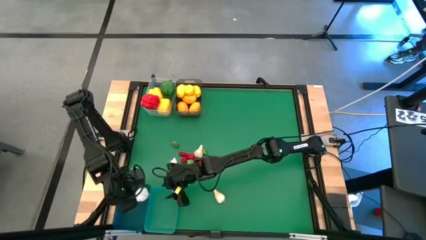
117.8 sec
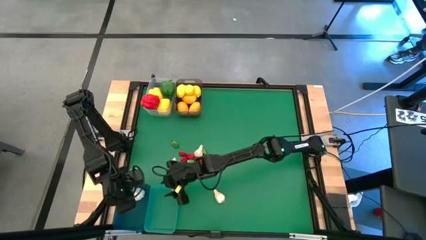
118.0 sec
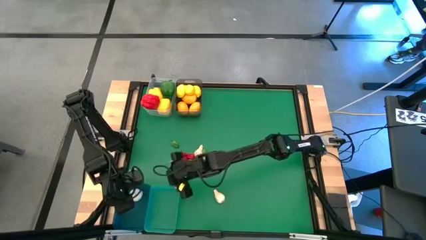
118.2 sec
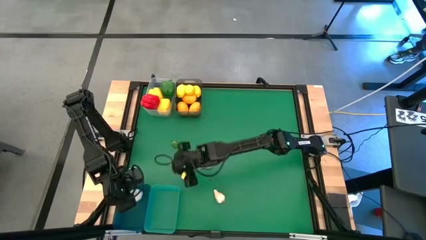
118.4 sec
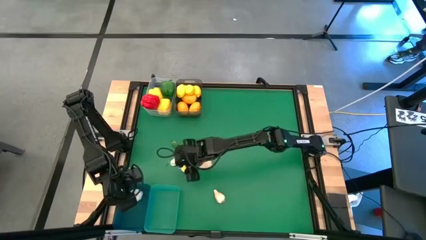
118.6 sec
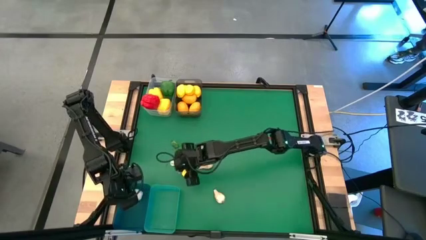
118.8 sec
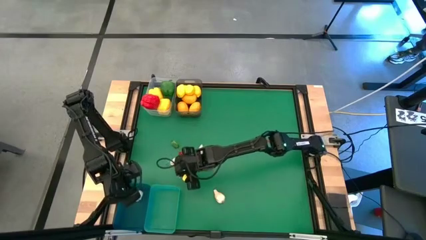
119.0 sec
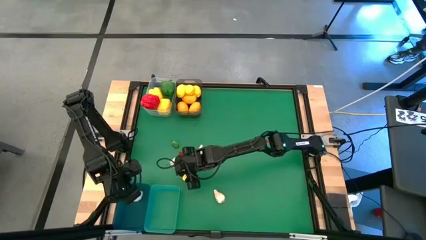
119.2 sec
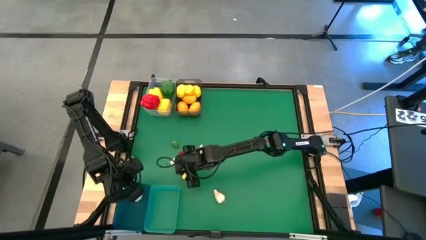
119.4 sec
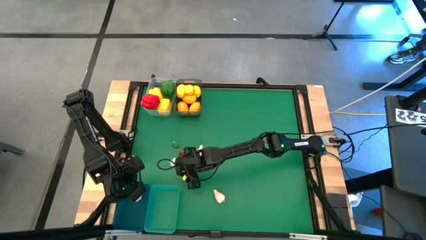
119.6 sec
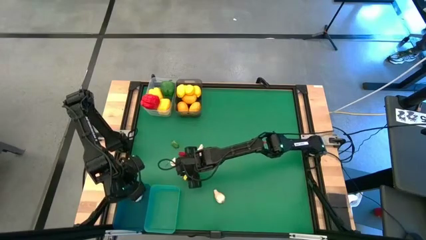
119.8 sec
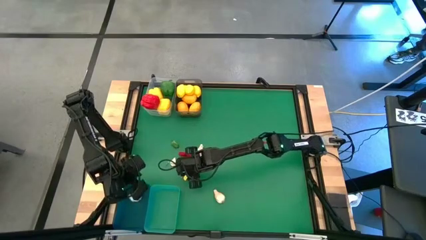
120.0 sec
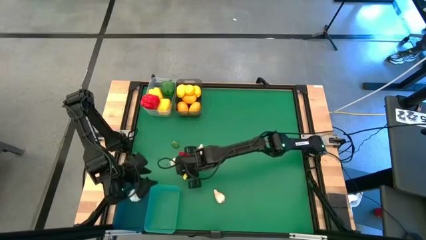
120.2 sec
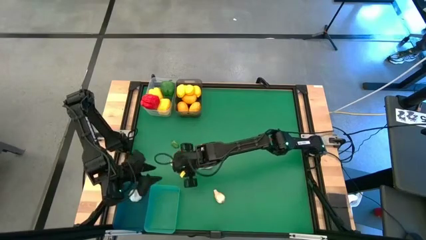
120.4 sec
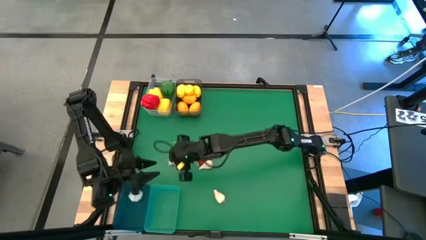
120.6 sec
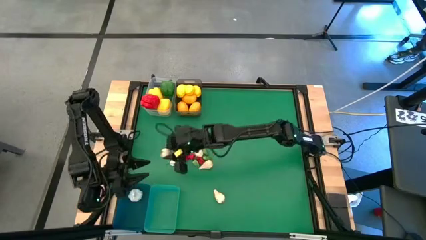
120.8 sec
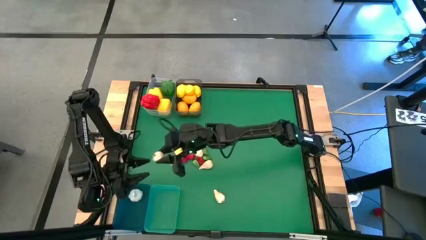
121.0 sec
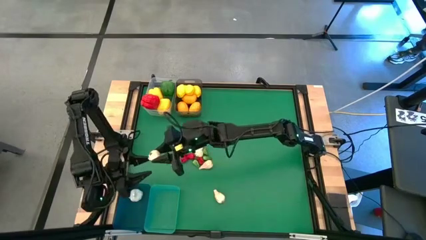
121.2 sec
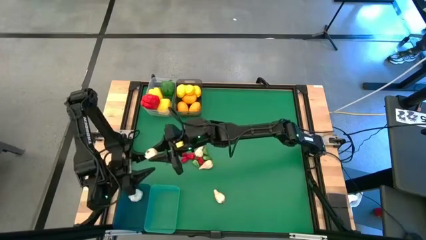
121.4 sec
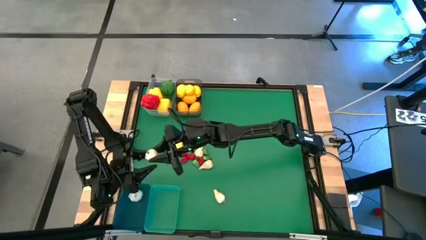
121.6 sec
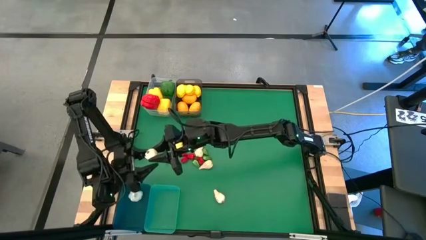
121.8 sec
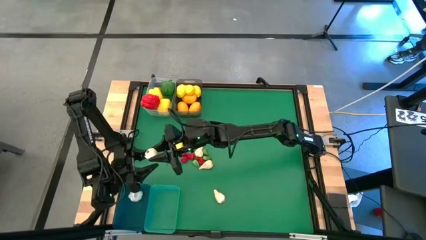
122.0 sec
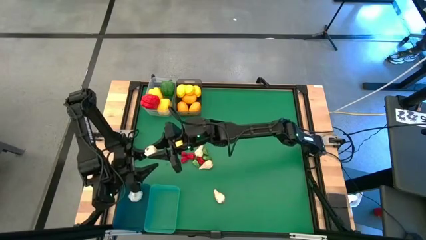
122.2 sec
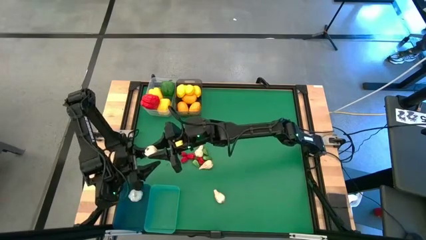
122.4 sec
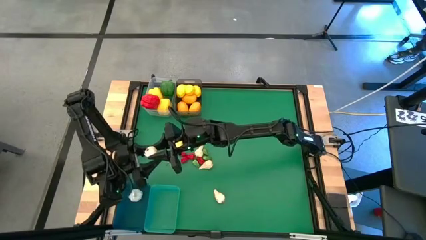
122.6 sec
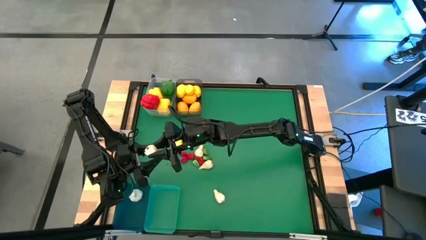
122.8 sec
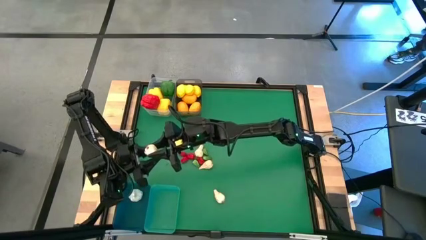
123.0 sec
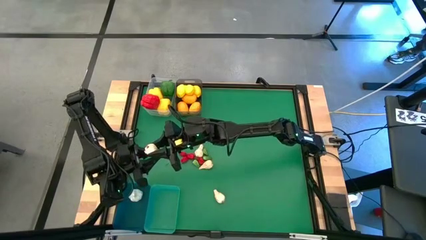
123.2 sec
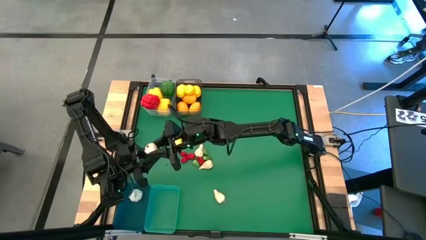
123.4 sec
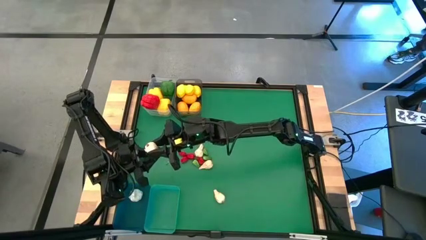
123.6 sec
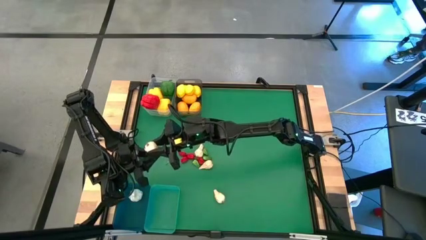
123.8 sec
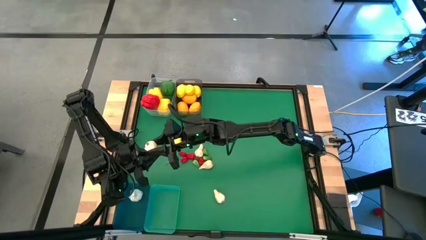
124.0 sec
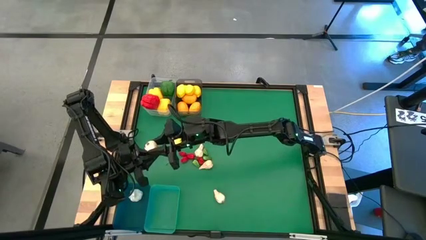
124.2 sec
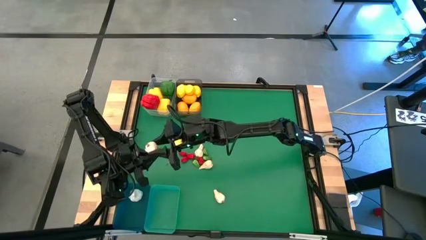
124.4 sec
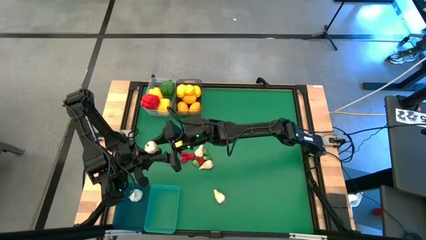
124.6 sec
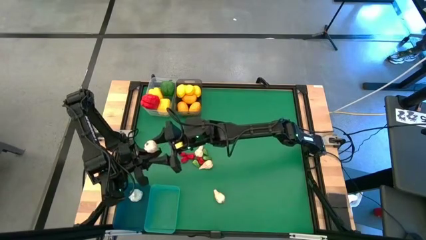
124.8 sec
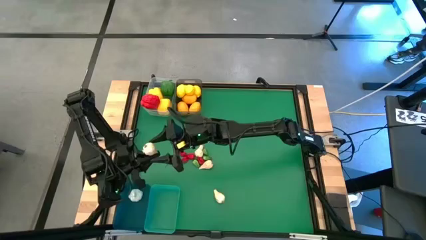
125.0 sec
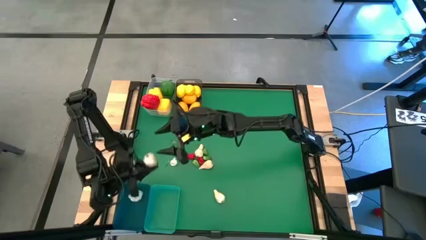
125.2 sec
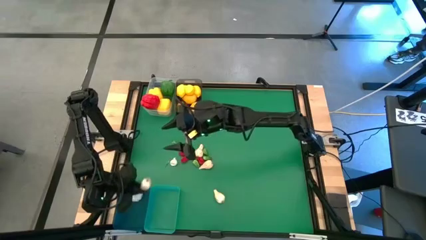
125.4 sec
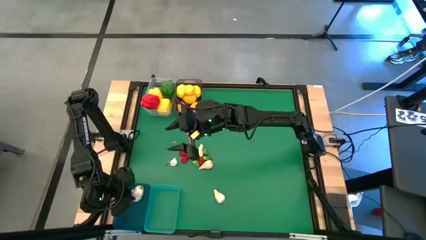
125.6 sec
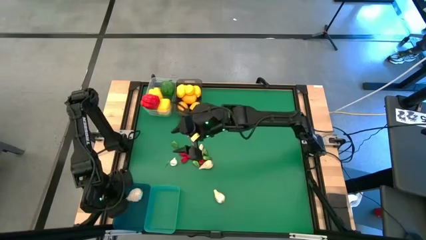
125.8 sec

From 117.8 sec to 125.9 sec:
Task: Sort produce into baskets
Put the white garlic into the blue bin

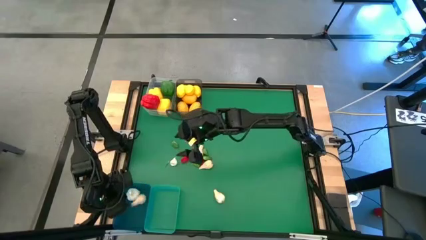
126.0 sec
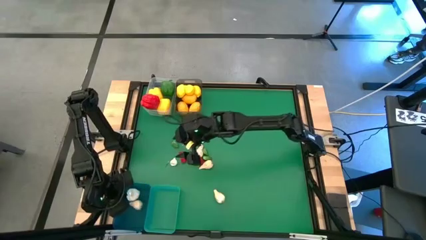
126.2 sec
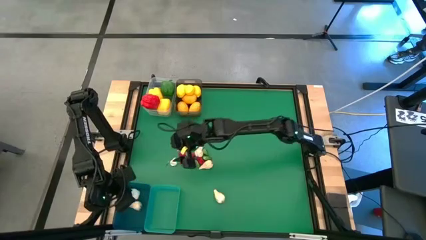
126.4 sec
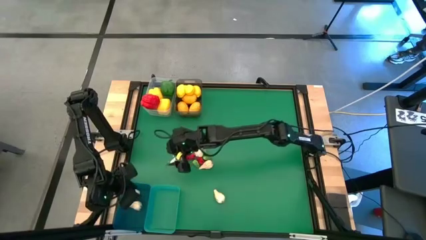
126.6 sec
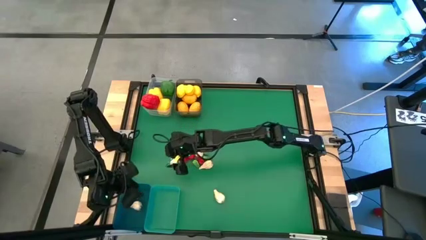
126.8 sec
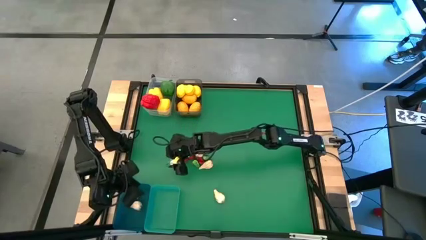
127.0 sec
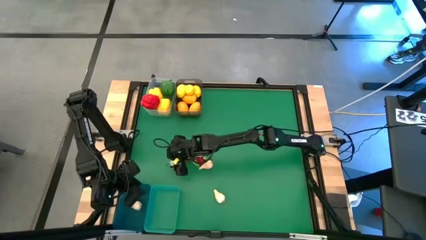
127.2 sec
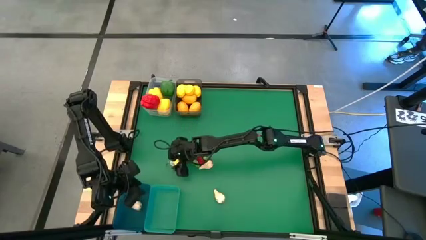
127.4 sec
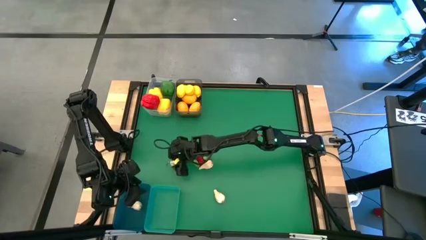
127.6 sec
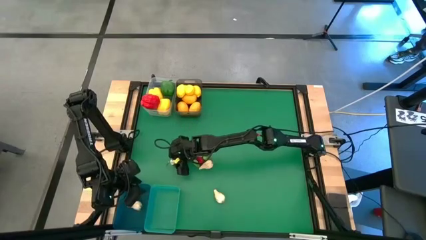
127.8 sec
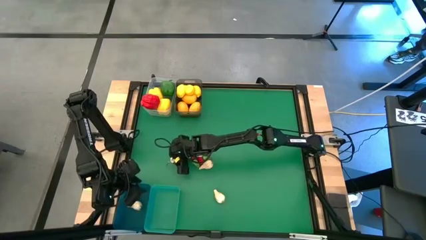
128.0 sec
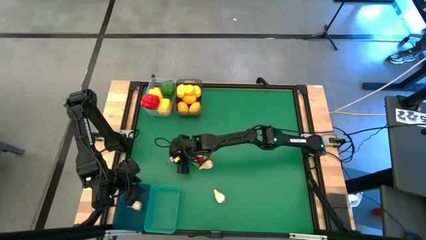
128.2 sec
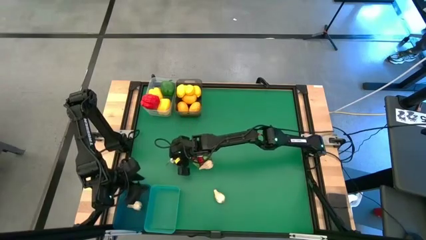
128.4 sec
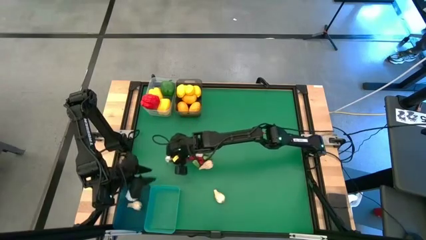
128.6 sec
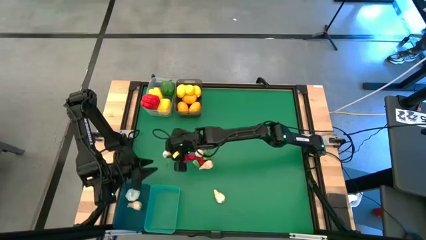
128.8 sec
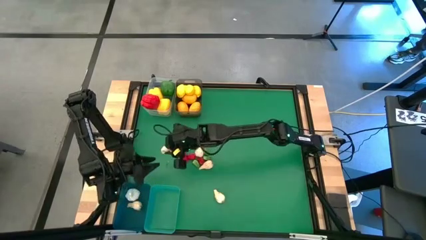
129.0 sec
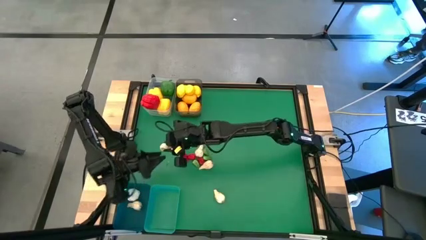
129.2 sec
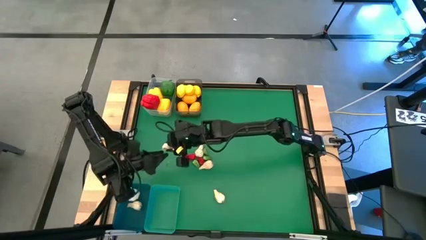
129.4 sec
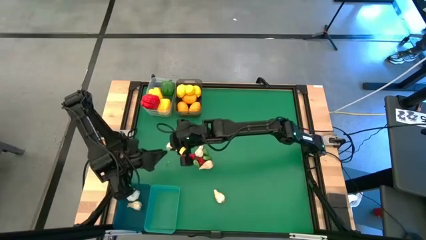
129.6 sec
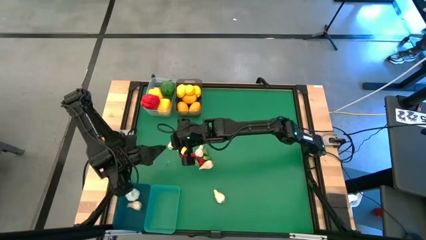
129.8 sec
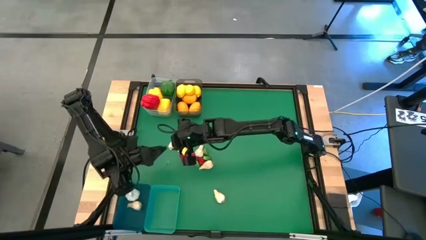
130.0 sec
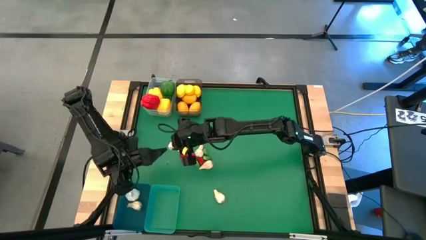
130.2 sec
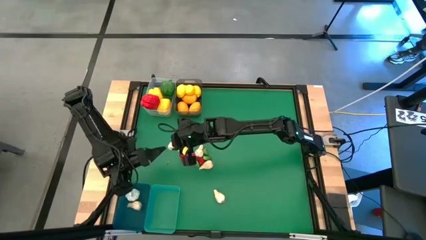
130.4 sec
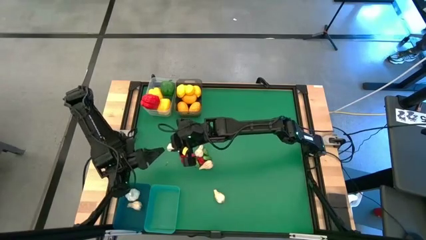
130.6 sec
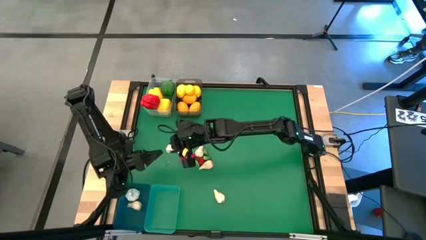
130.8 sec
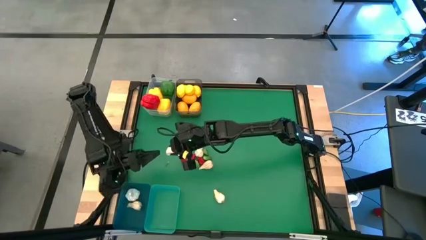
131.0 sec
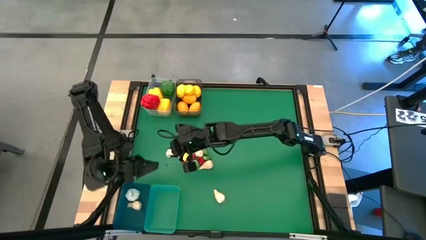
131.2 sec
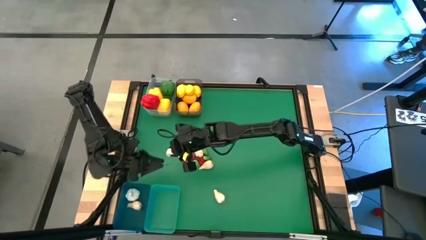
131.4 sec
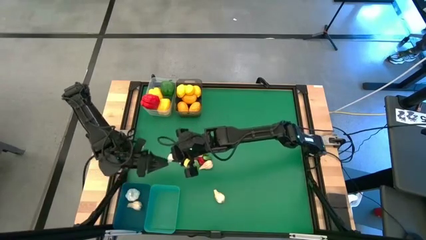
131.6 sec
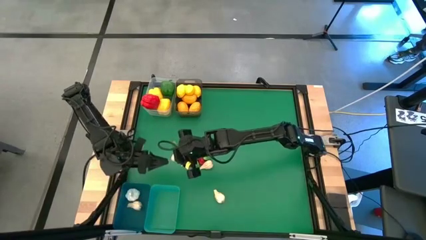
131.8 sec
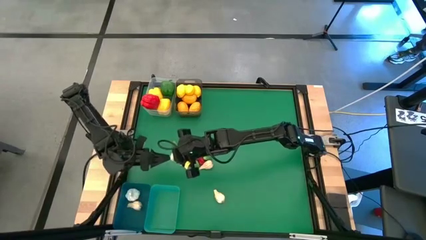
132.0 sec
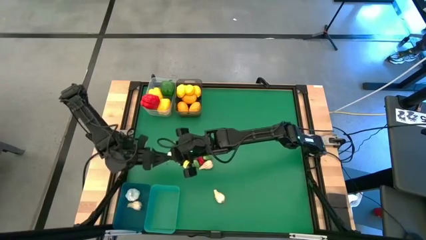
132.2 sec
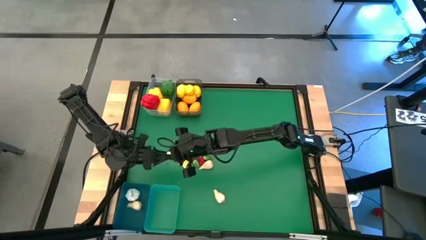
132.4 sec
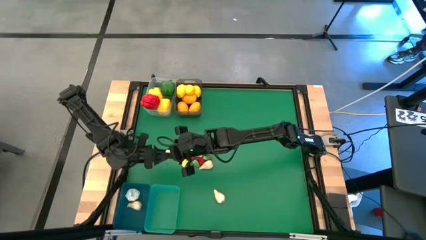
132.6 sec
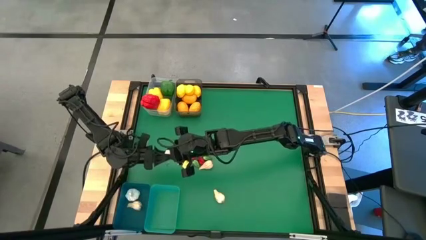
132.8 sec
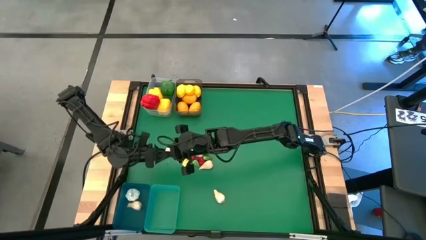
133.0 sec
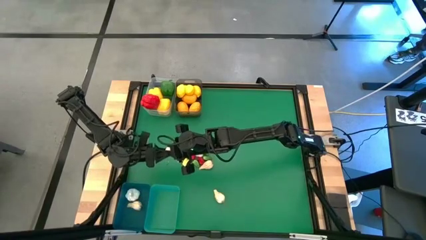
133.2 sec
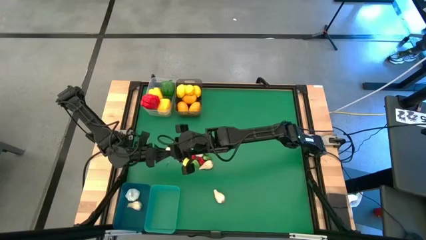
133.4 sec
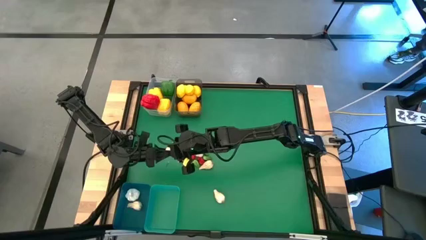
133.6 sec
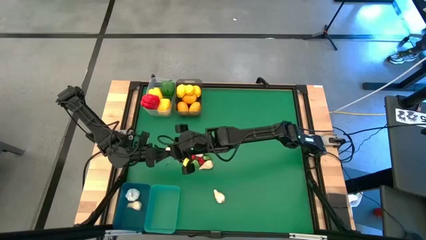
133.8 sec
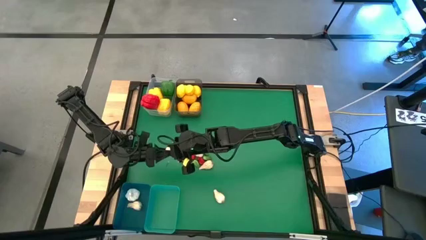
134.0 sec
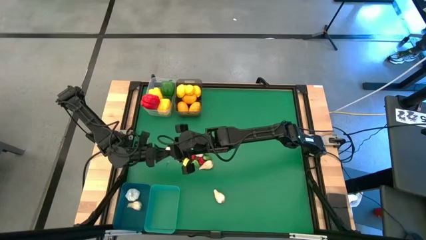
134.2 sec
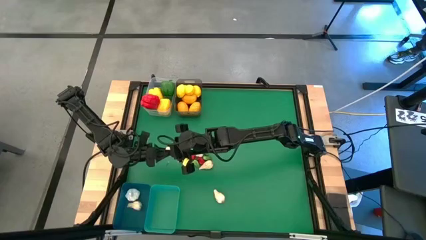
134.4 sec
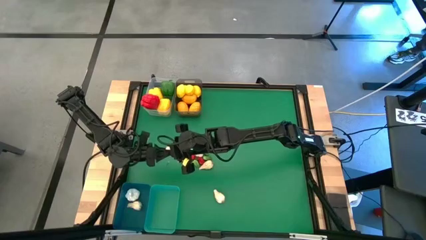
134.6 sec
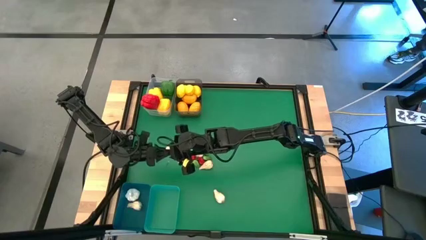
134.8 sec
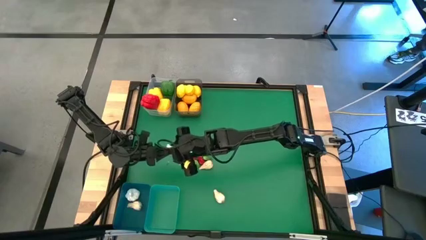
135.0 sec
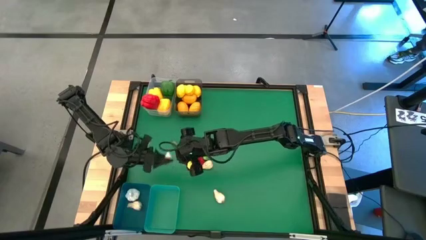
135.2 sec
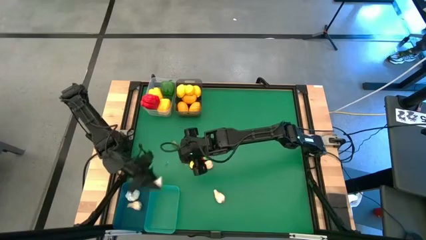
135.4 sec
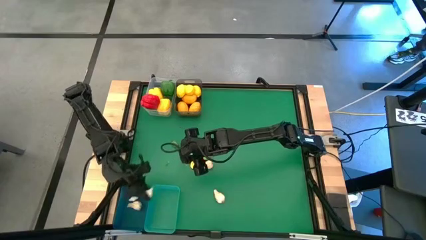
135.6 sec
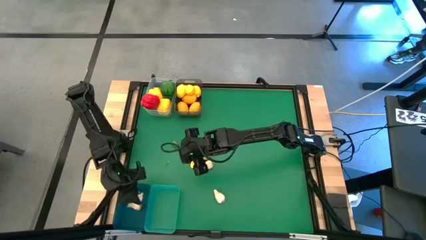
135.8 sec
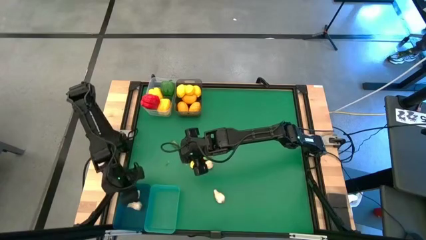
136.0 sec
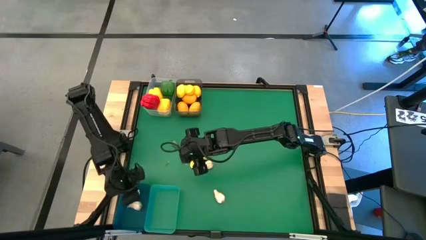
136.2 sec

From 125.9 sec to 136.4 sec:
Put the white garlic into the blue bin
